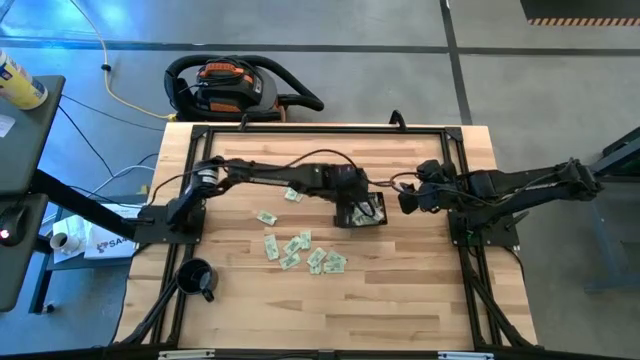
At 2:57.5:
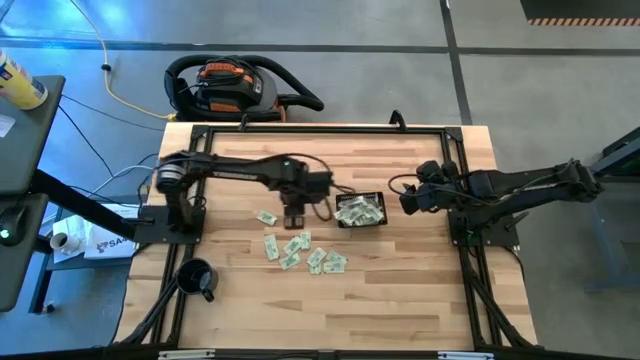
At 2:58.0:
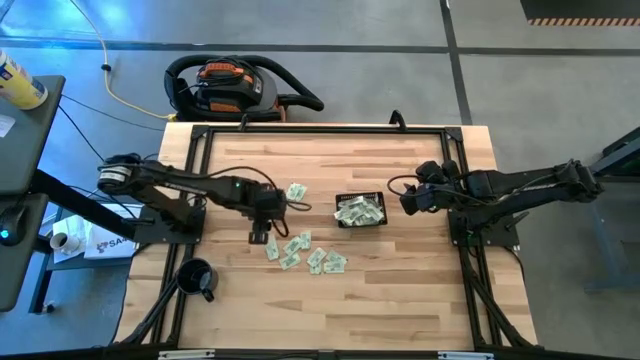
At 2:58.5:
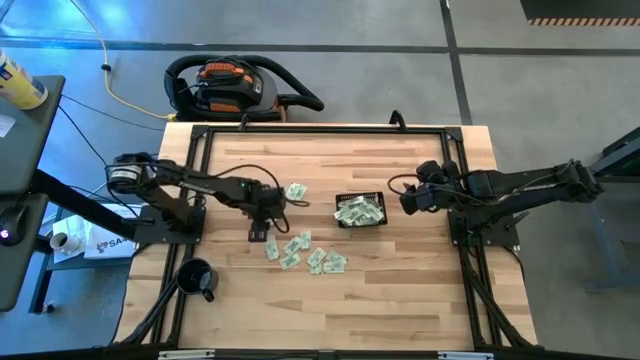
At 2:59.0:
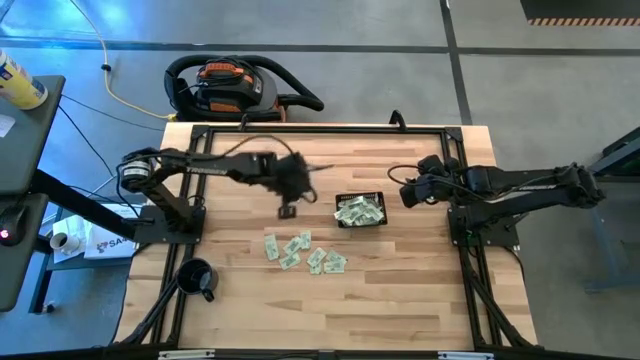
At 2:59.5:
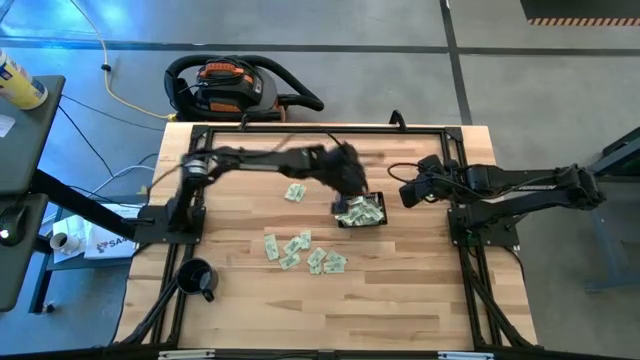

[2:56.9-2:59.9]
Task: Pick and place Stevia / Truvia into bins
Put the green stevia packet into the black bin

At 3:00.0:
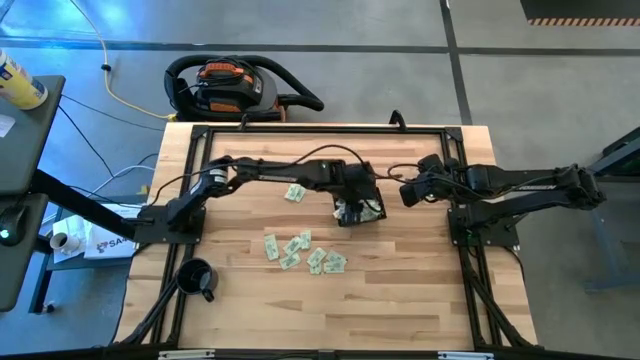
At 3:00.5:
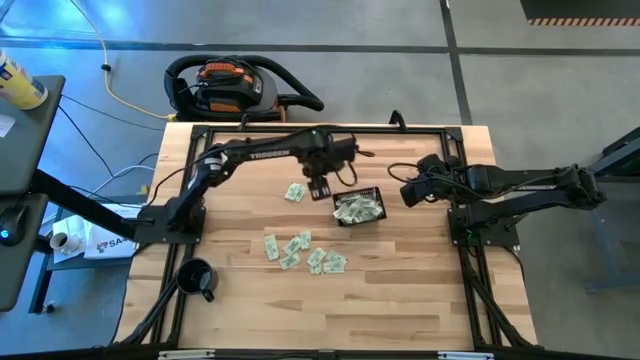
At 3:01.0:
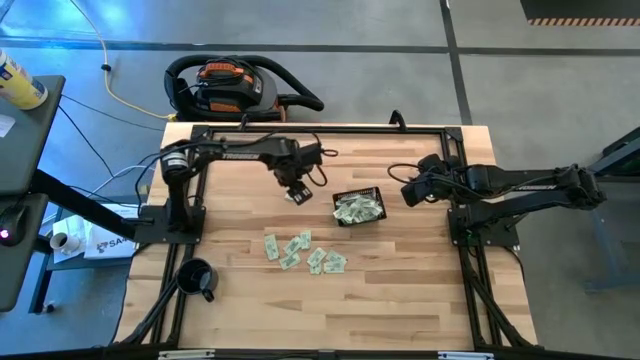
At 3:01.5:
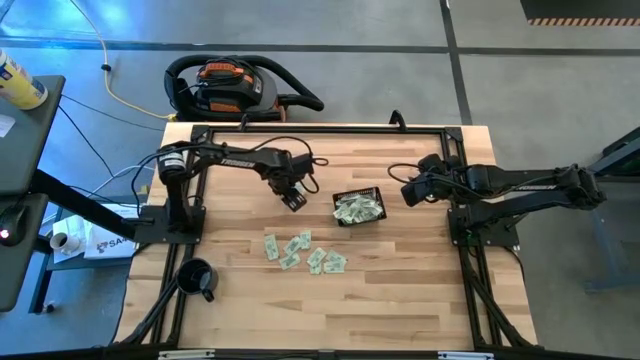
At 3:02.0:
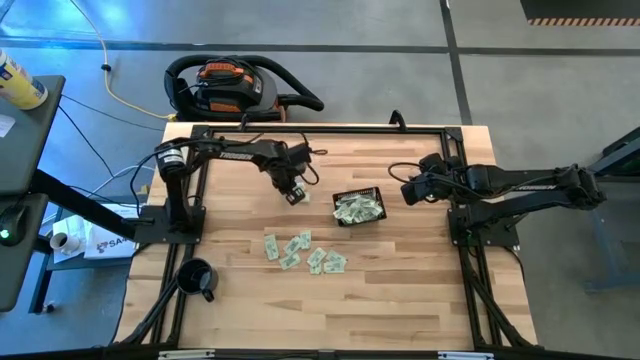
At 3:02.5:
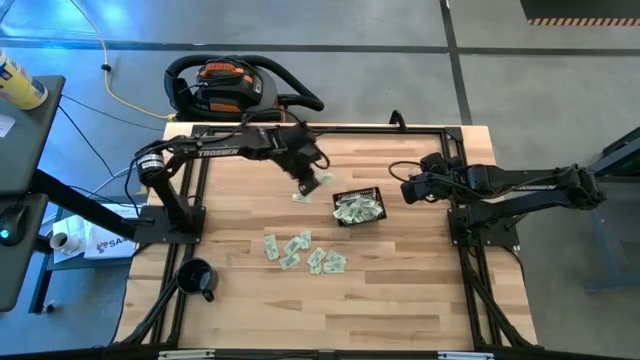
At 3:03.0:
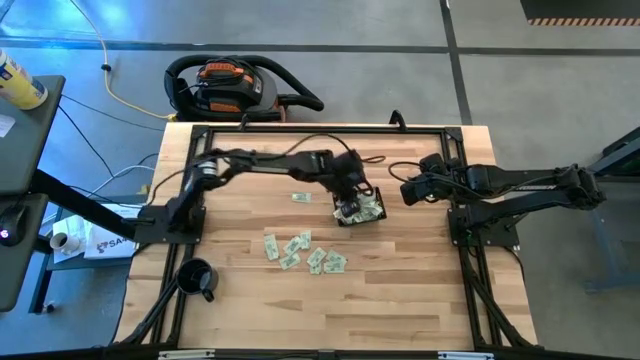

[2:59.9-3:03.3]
Put the green stevia packet into the black bin

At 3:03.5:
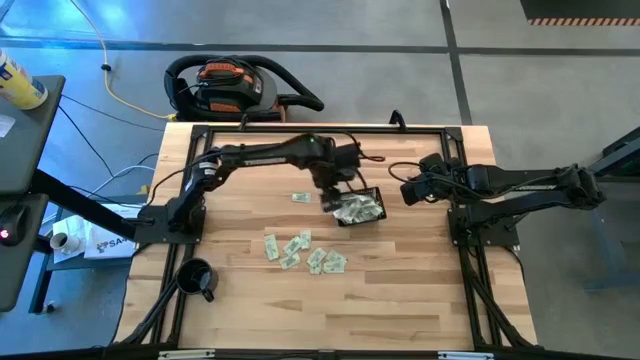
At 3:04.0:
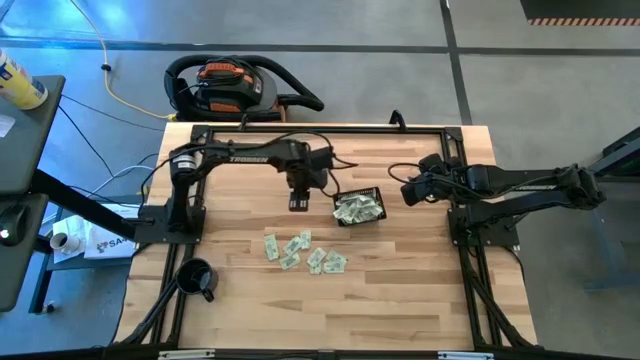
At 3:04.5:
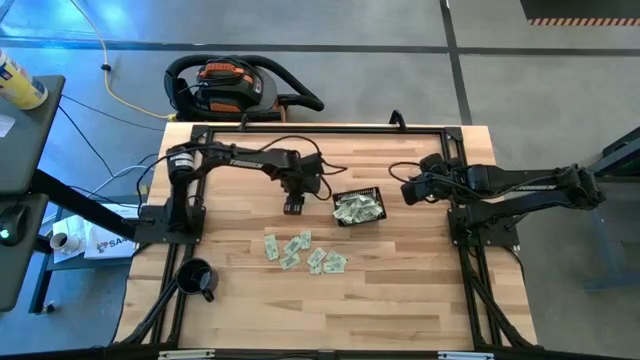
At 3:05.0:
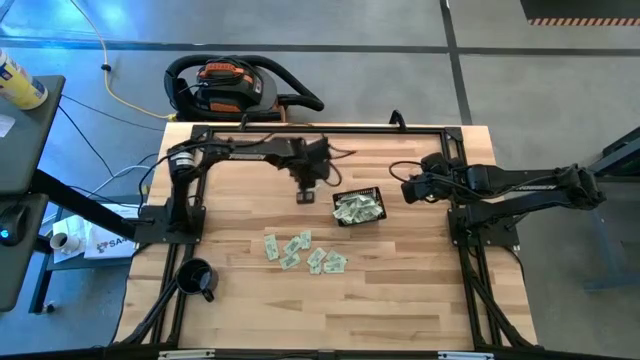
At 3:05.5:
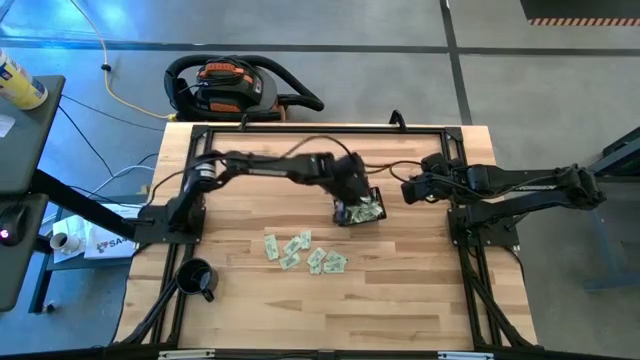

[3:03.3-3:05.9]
Put the green stevia packet into the black bin

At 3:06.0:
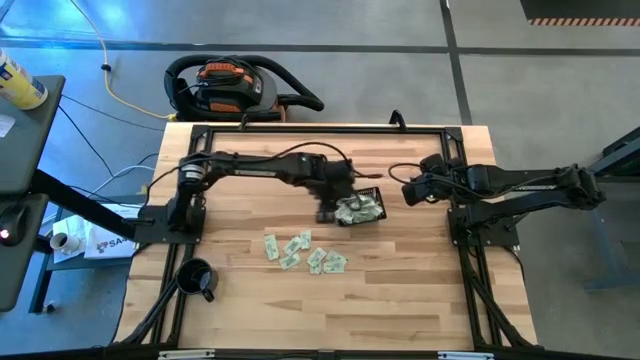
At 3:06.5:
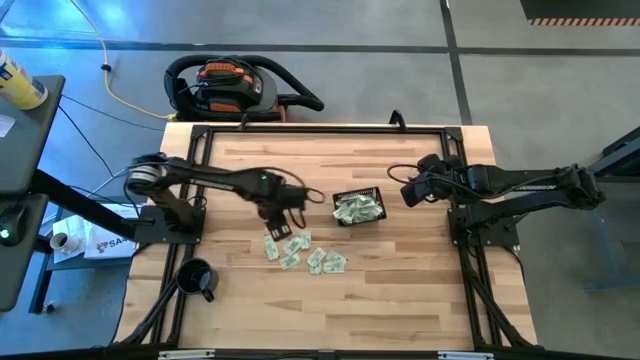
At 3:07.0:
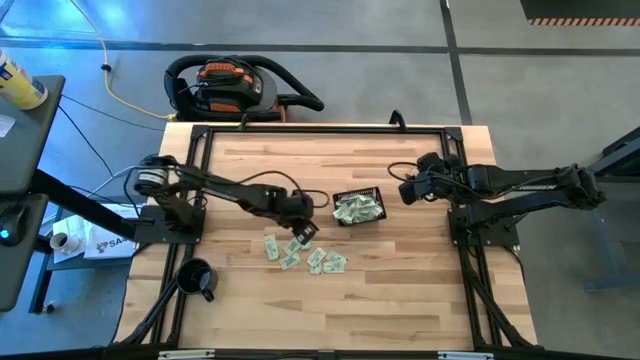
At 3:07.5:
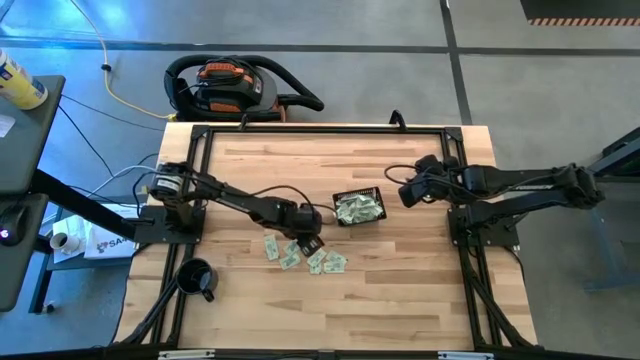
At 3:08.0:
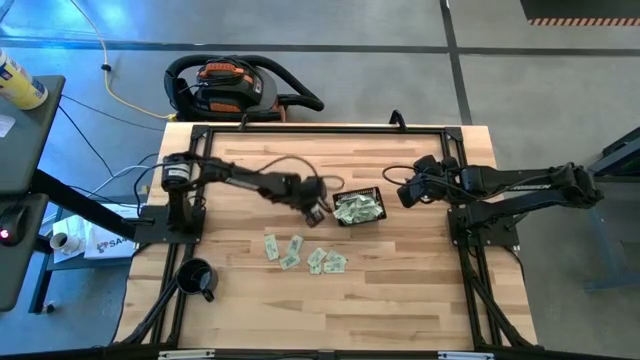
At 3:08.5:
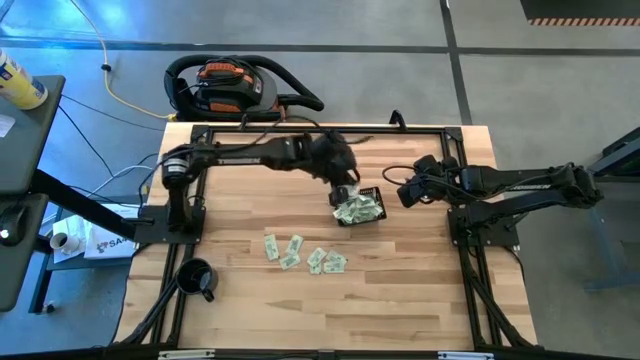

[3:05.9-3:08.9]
Put the green stevia packet into the black bin

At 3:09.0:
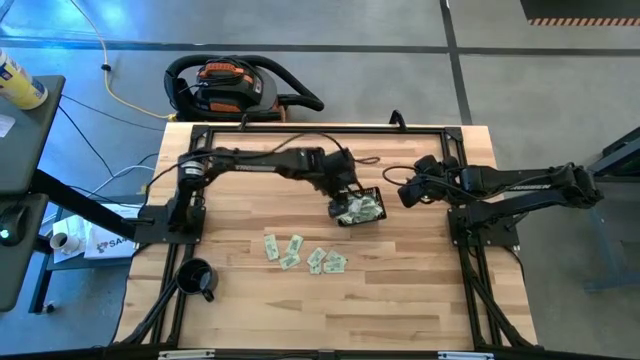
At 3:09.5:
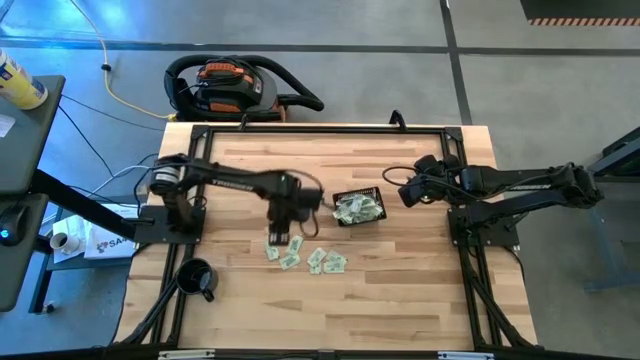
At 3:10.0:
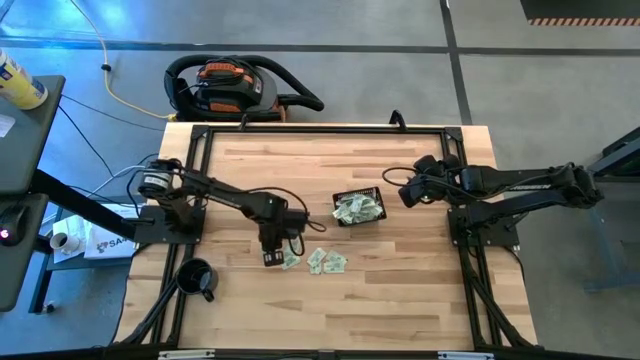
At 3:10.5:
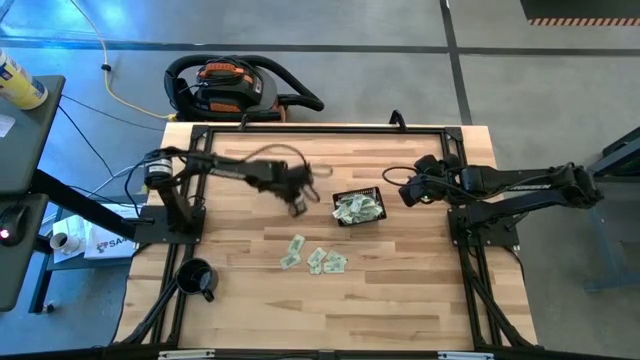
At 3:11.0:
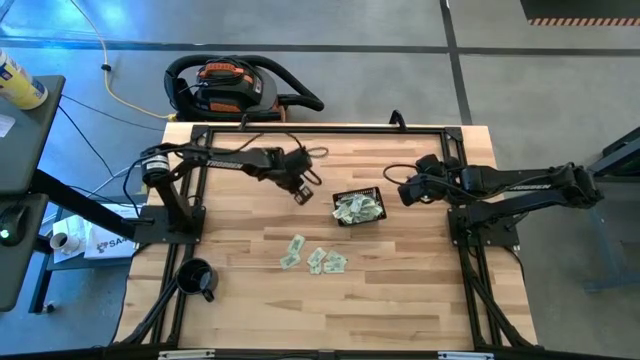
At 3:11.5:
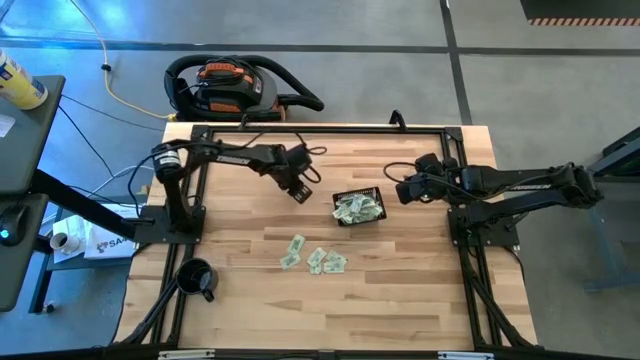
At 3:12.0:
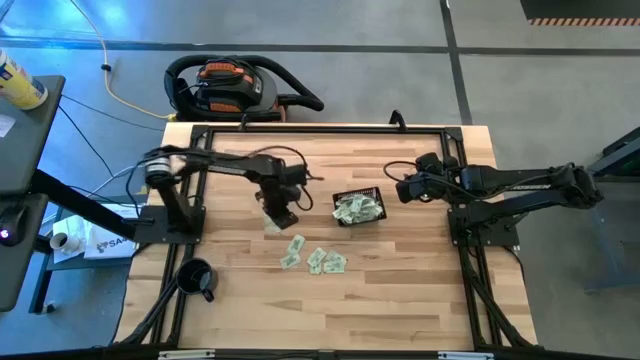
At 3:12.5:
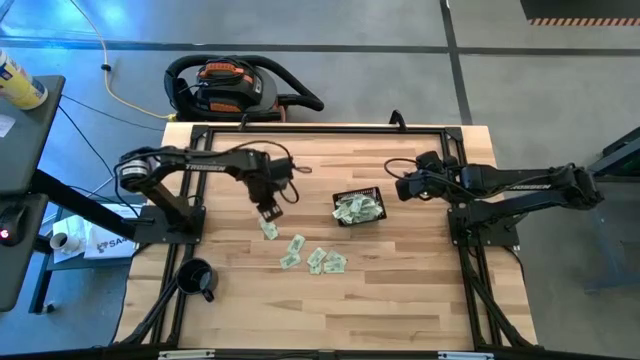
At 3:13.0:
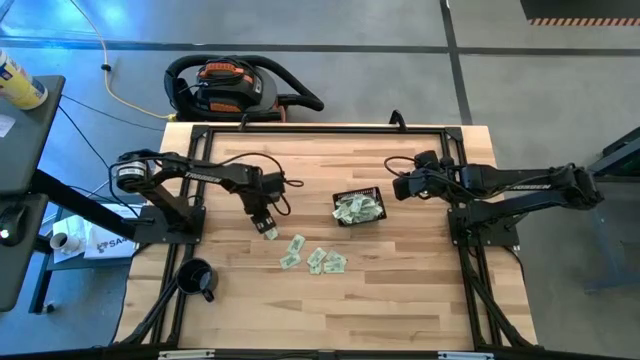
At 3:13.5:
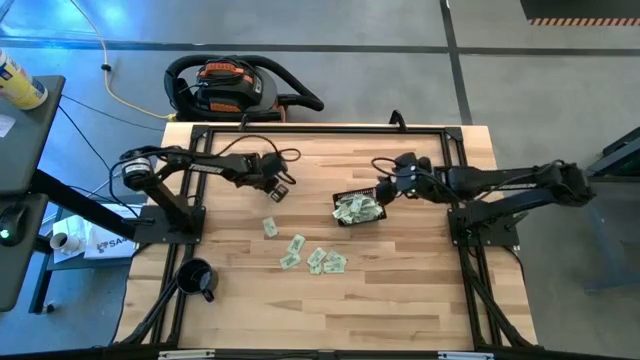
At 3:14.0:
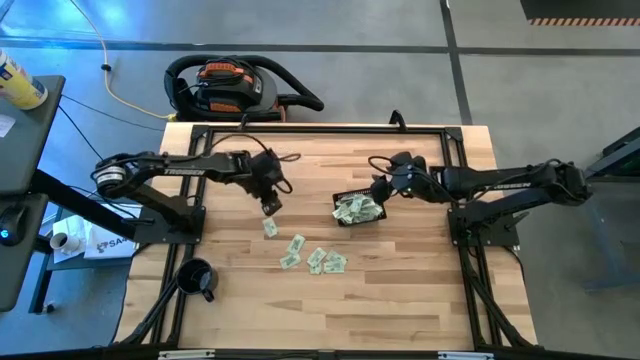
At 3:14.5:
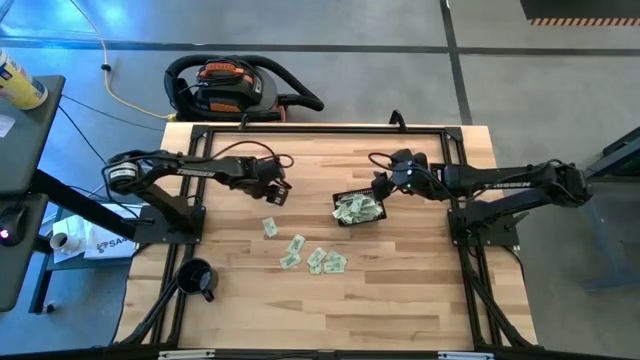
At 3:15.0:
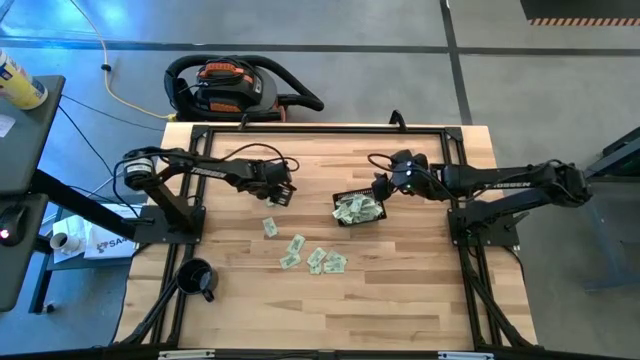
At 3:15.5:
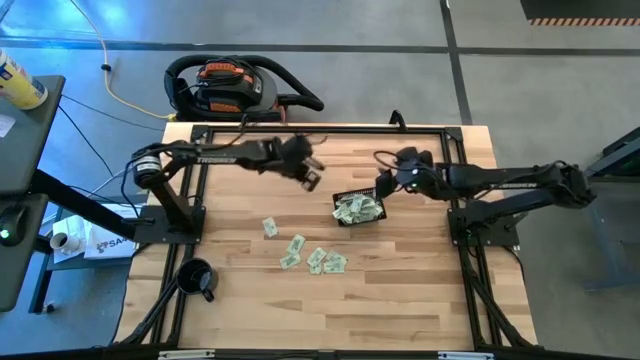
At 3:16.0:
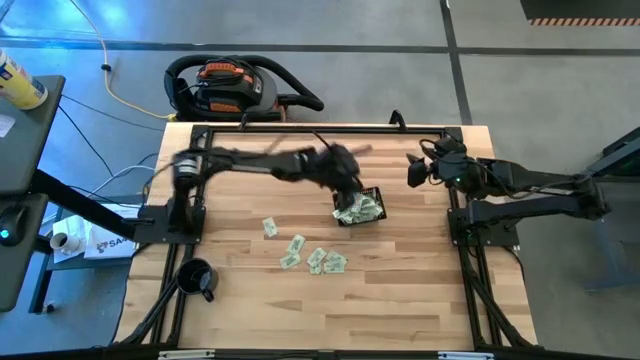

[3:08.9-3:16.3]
Put the green stevia packet into the black bin

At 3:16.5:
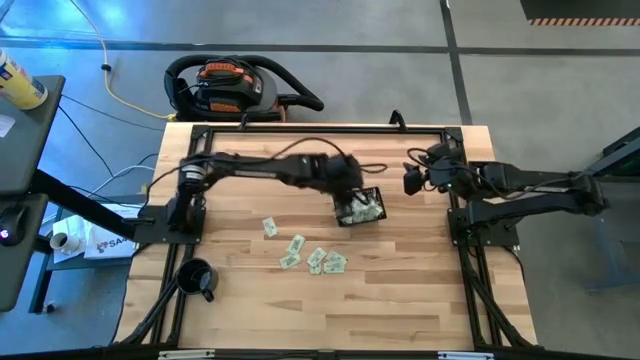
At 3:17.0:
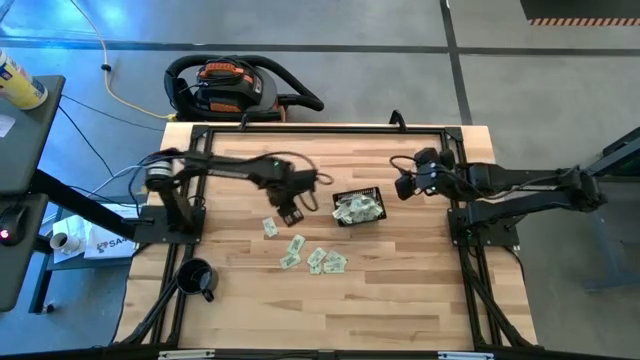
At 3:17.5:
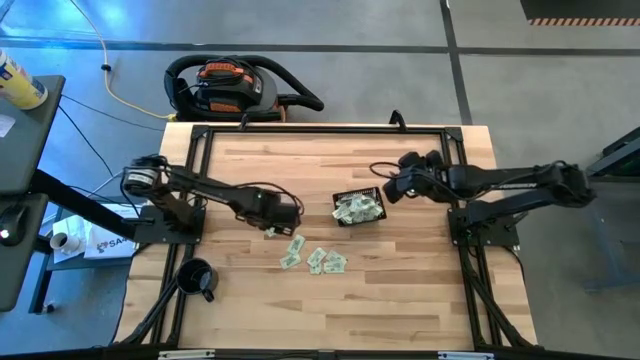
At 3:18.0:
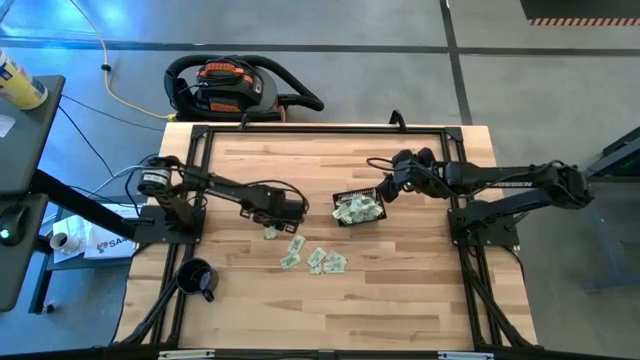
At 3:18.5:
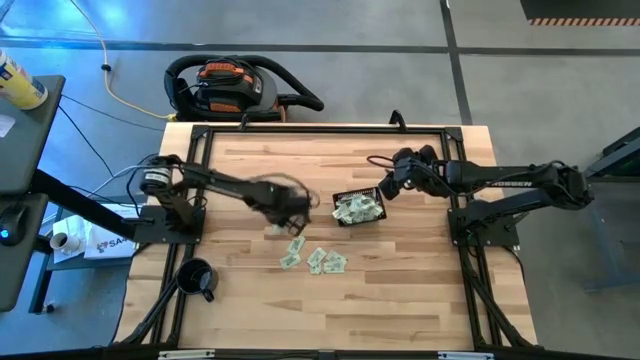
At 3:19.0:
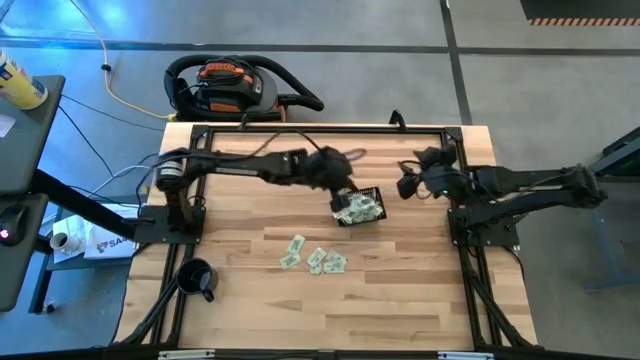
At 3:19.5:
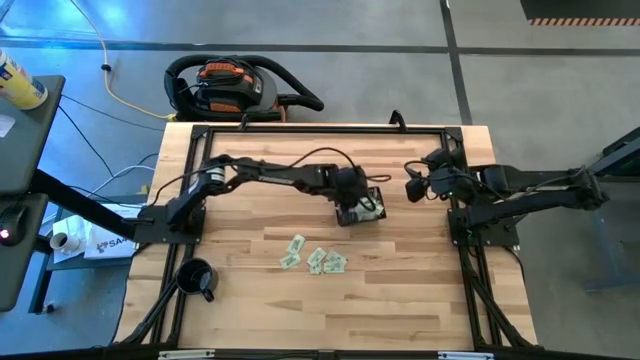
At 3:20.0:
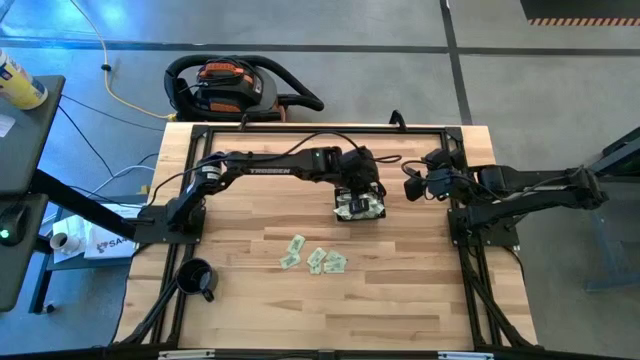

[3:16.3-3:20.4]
Put the green stevia packet into the black bin
